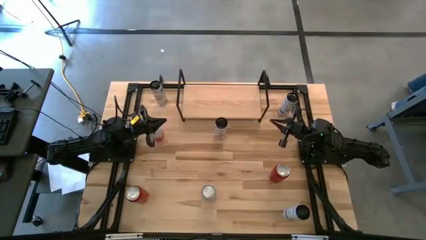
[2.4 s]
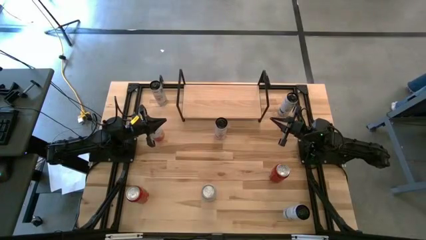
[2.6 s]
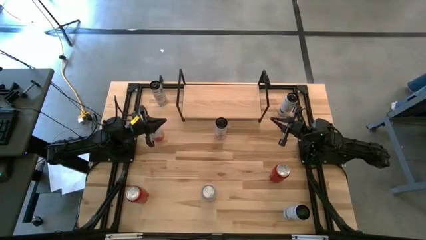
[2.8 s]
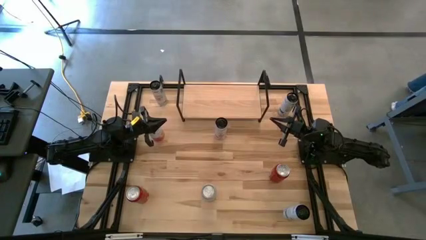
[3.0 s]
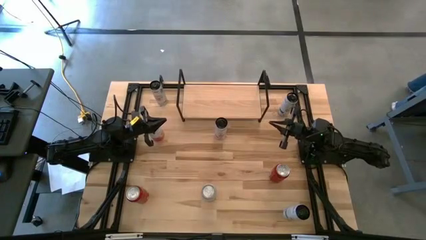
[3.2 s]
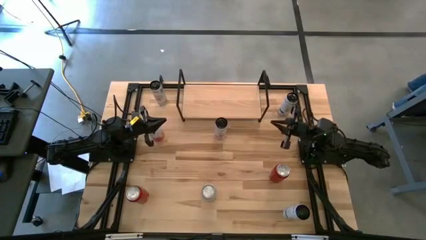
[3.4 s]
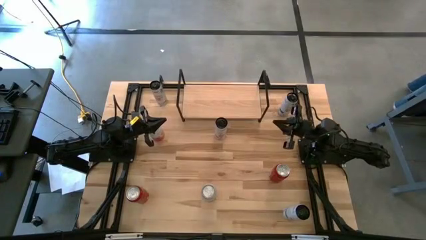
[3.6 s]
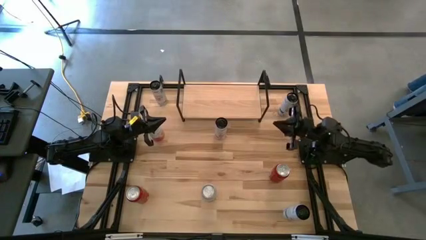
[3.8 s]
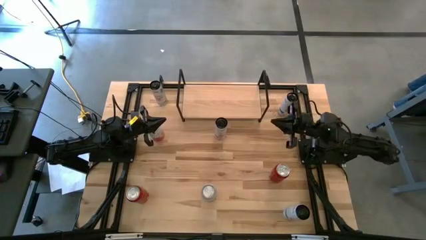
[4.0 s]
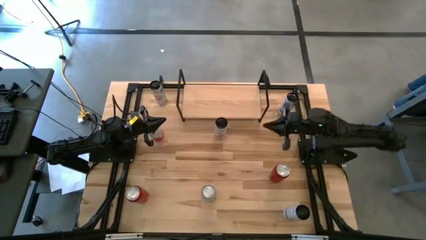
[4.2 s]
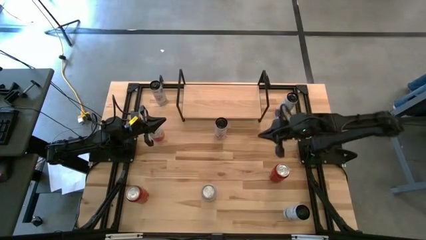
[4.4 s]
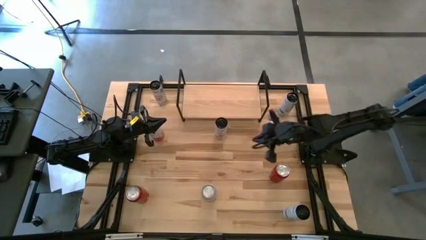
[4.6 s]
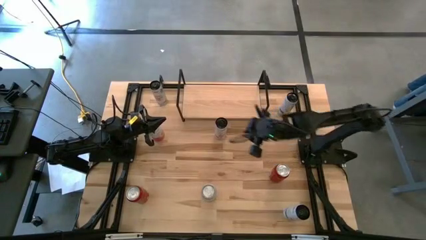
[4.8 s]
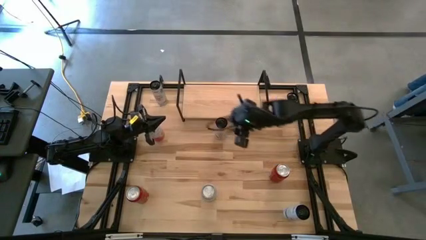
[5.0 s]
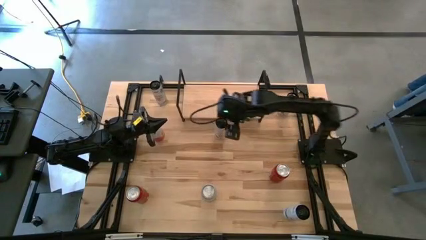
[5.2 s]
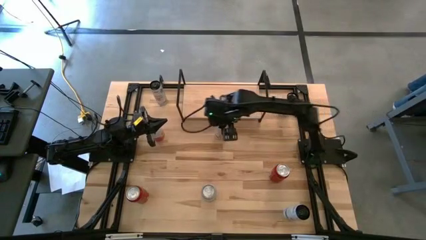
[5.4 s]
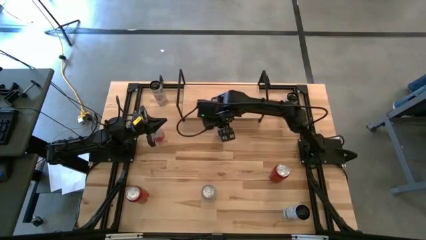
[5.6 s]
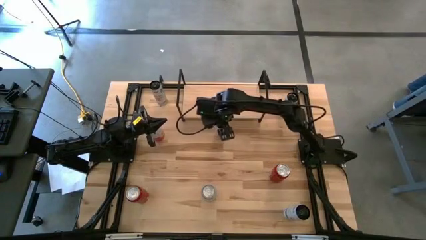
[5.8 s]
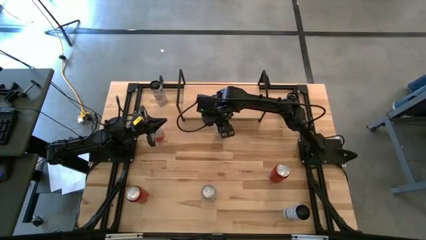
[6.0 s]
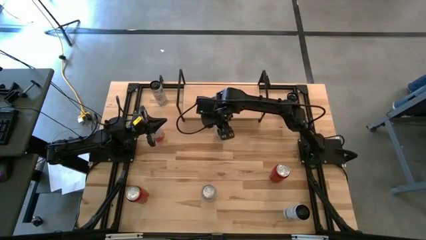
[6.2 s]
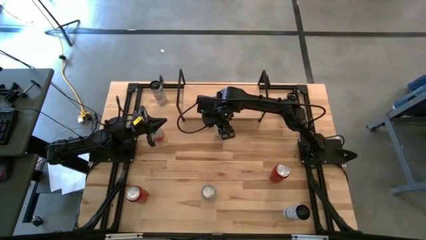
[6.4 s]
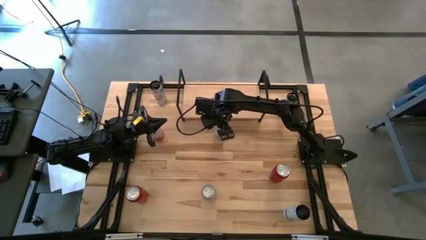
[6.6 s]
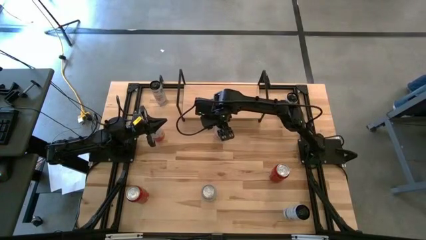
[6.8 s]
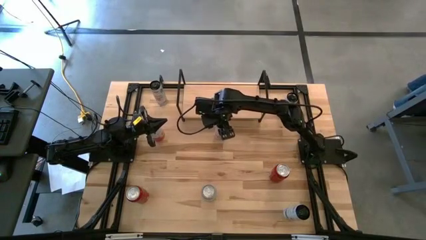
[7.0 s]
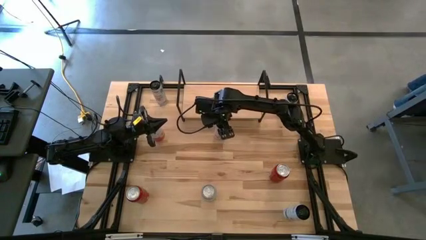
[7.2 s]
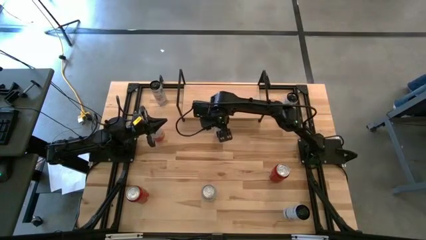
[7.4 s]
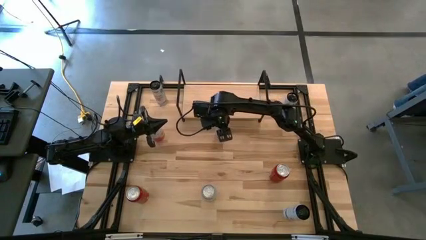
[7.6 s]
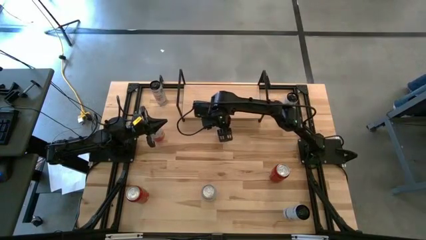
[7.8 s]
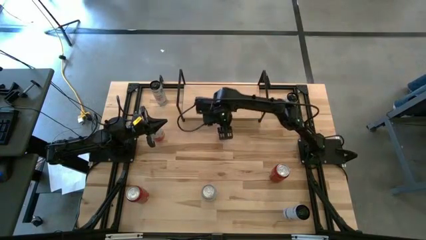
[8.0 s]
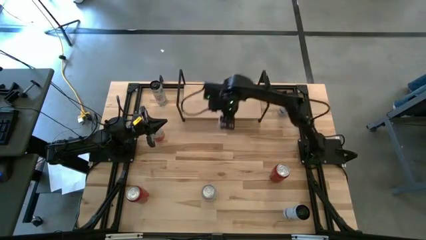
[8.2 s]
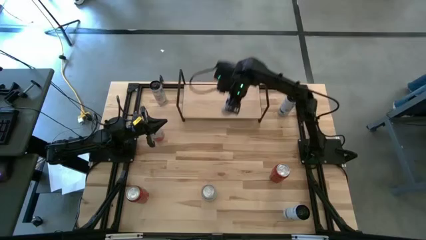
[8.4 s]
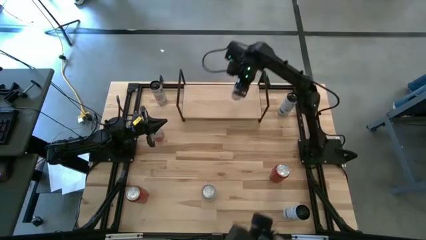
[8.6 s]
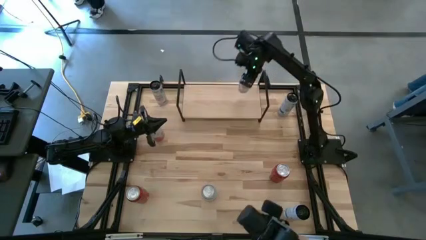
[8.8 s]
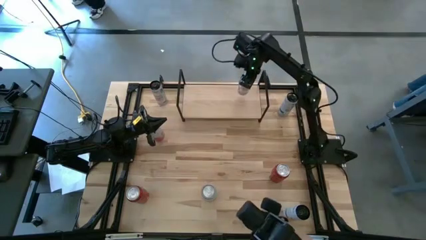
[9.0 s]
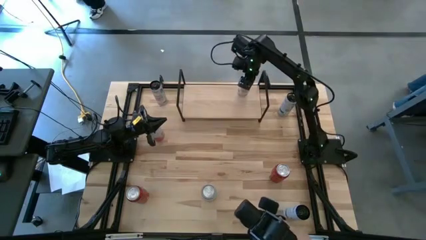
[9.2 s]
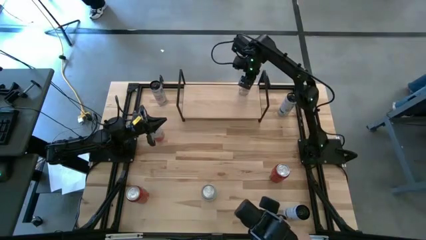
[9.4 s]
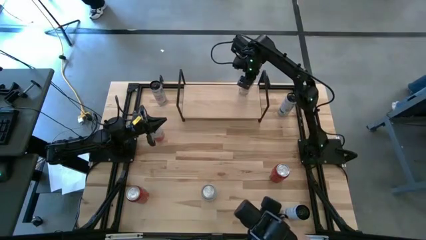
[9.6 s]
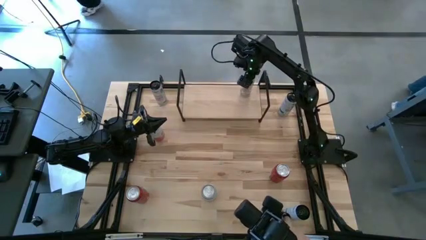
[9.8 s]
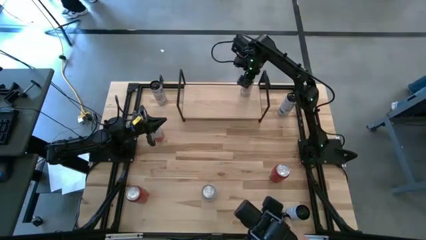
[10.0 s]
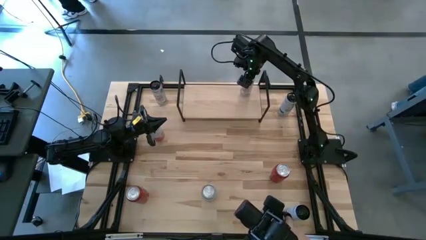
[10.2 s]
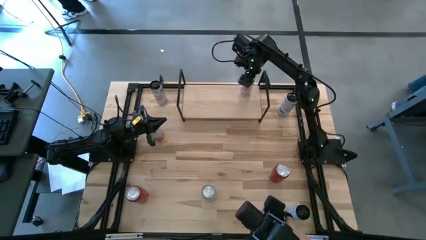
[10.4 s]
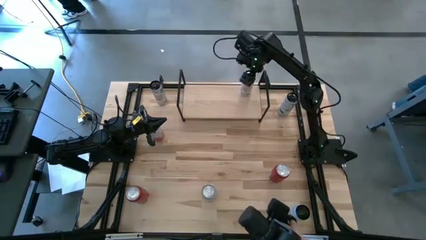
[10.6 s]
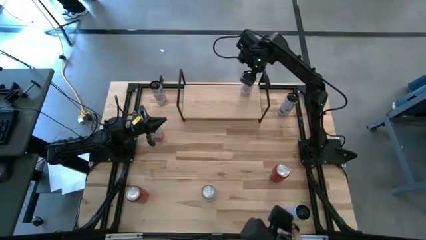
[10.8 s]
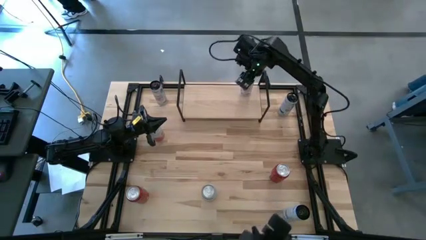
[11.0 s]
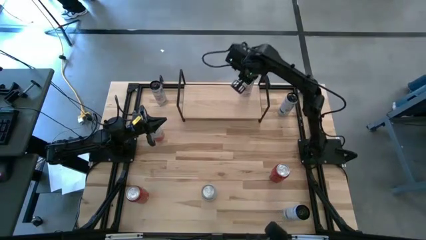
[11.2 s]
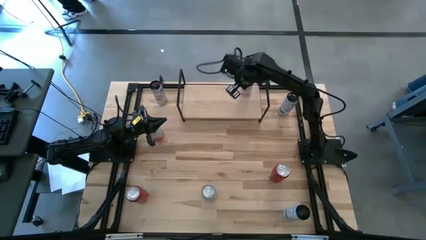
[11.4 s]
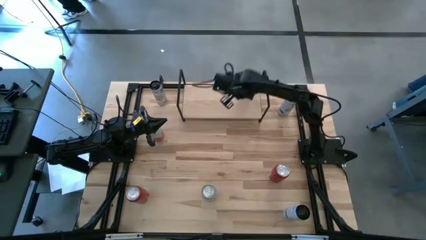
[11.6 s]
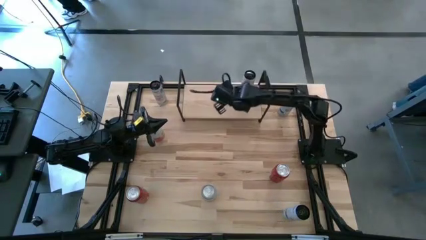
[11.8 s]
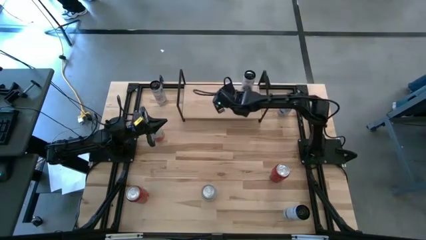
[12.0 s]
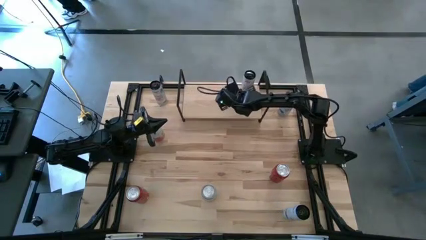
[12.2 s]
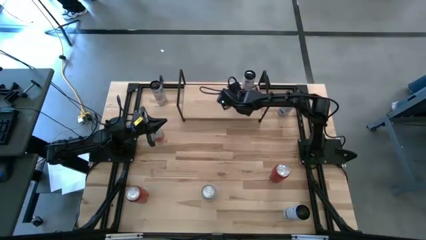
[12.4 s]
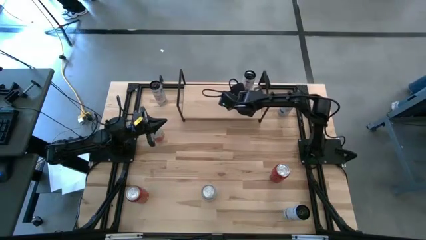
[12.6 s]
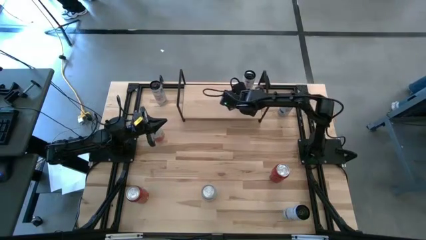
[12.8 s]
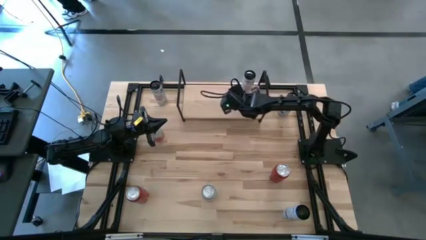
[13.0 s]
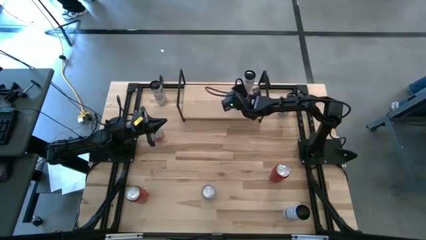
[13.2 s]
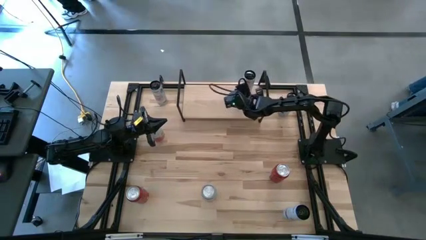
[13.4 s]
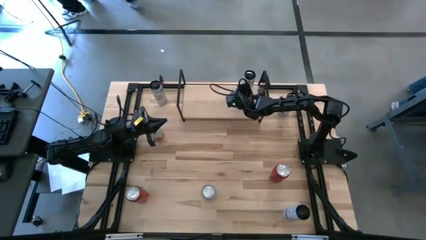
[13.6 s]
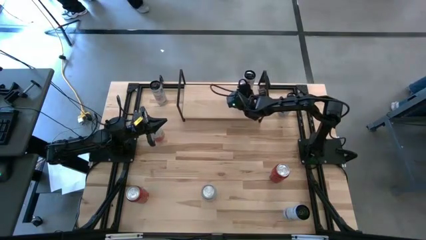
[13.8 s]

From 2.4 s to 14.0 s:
Task: Place canned beverage on shelf
Put the bottom white and red soda can on the shelf

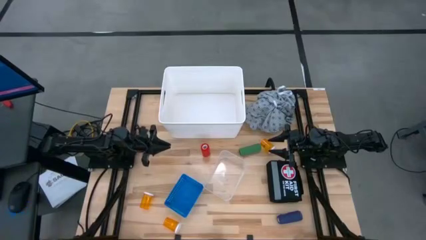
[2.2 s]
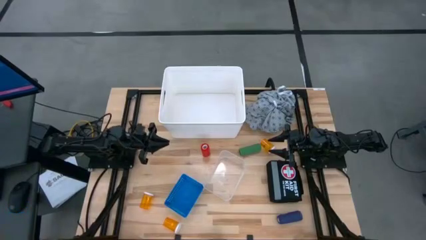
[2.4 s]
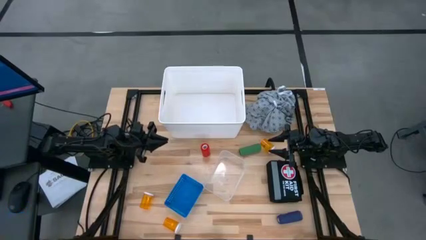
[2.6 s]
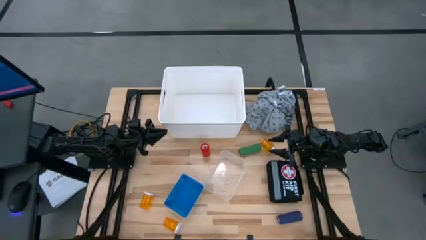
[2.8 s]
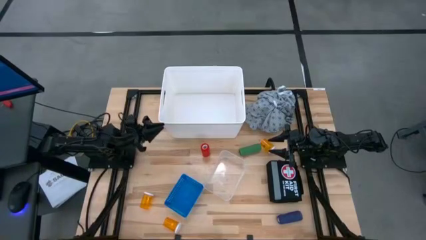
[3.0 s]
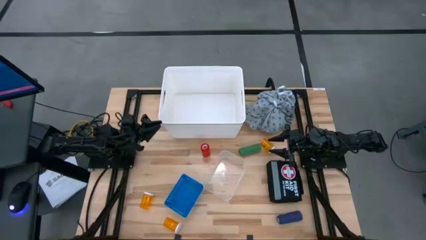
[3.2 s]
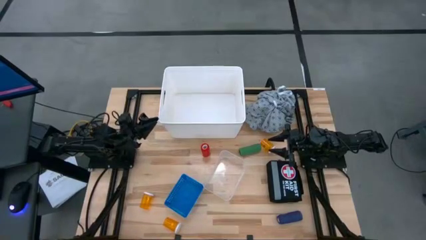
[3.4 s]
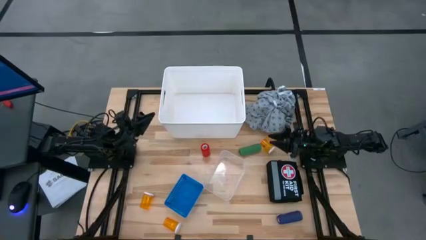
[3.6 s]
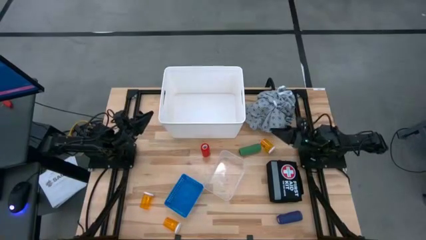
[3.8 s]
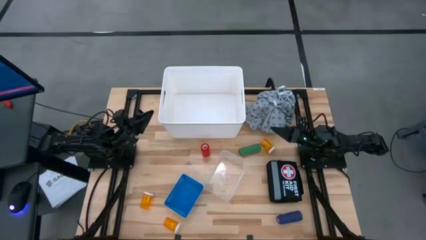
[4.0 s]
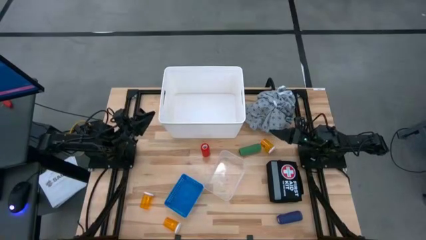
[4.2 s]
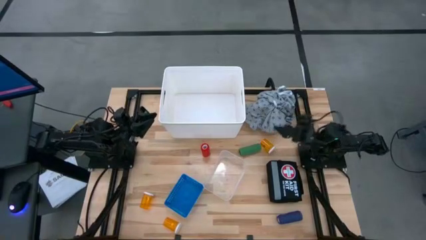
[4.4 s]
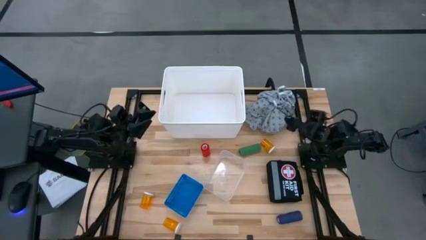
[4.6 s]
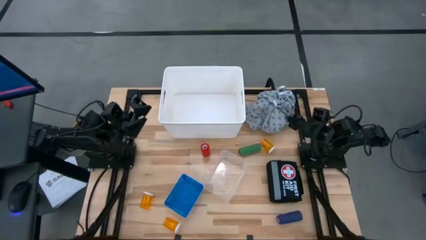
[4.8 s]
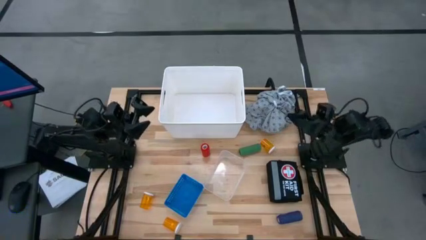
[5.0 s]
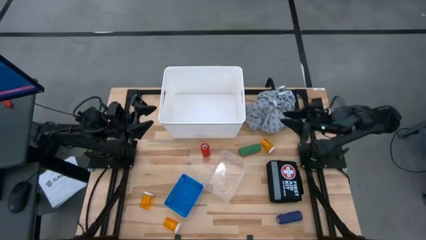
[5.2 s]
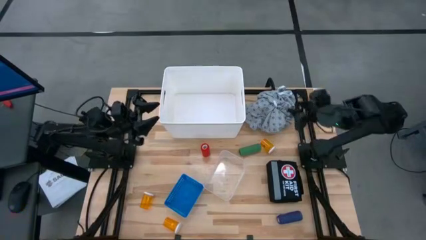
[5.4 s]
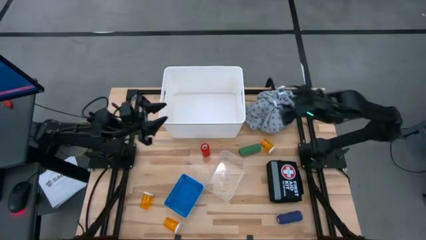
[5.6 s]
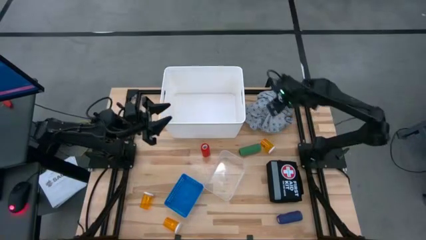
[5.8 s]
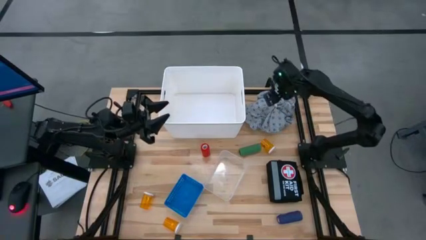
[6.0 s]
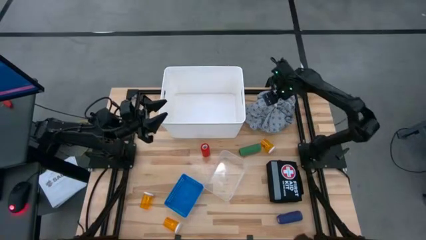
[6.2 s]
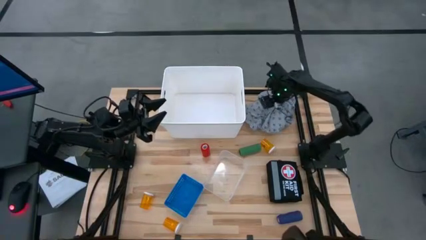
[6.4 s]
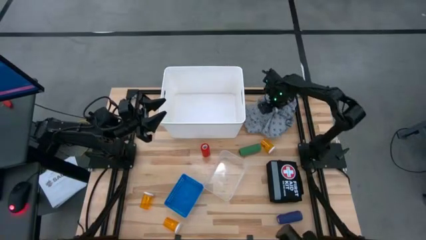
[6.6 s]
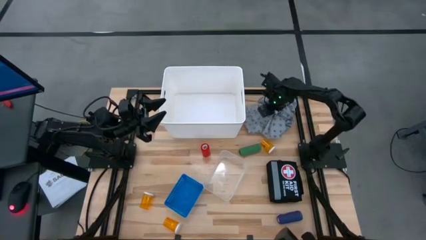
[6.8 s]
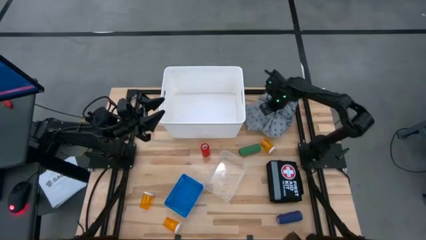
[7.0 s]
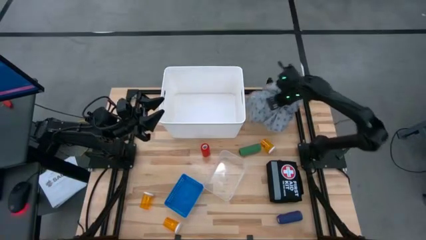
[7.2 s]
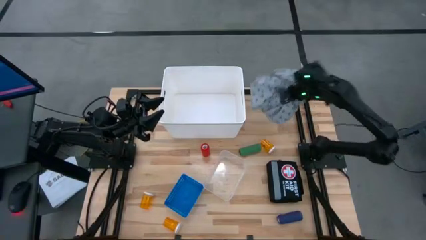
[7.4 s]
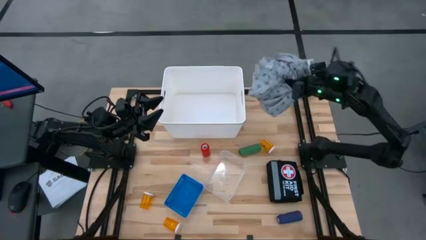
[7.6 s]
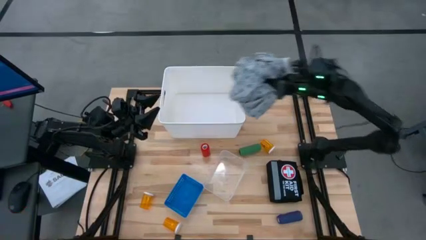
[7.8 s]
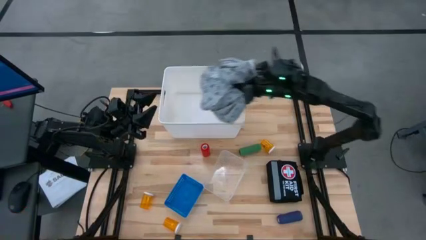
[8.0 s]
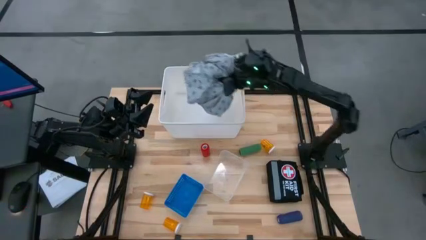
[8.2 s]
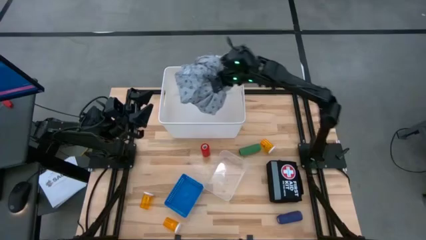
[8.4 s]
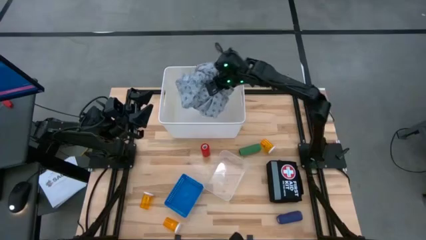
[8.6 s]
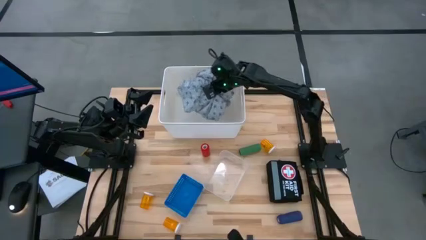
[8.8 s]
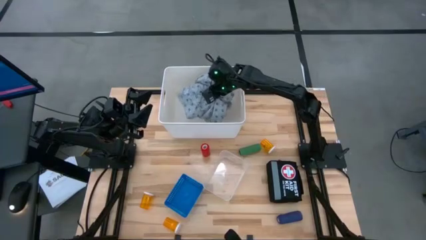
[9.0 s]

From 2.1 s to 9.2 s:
Task: Pick & Place Medicine items
Put the gray gown into the white bin
